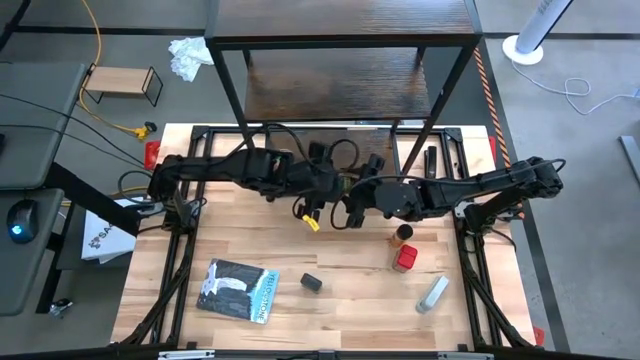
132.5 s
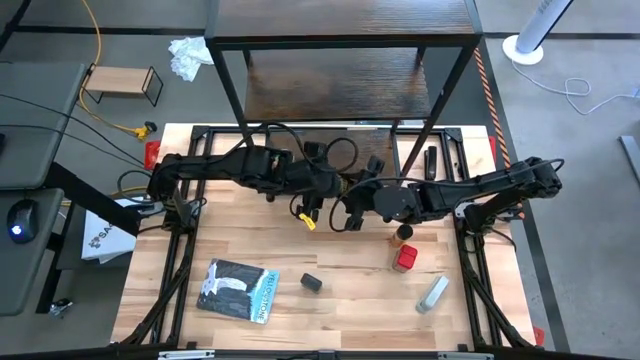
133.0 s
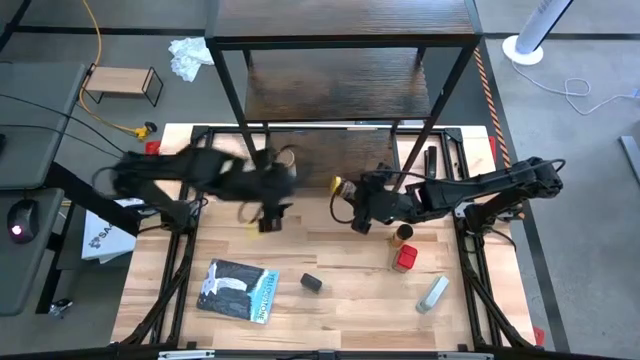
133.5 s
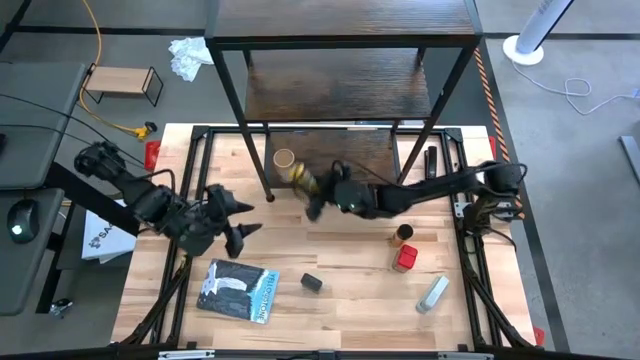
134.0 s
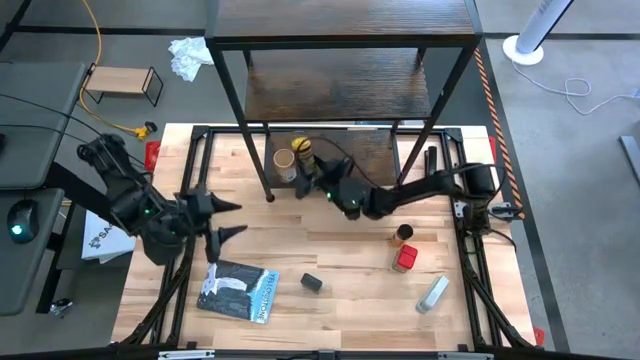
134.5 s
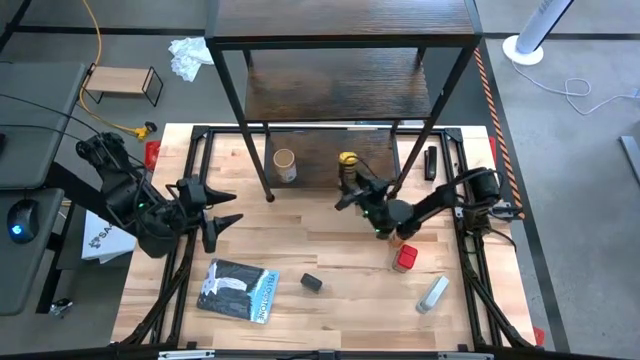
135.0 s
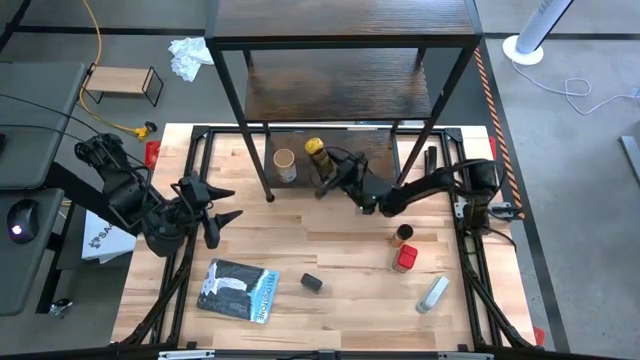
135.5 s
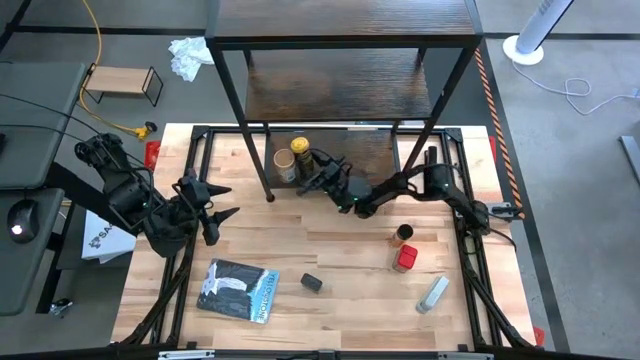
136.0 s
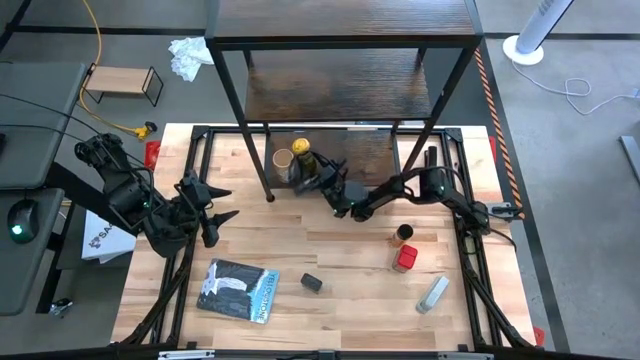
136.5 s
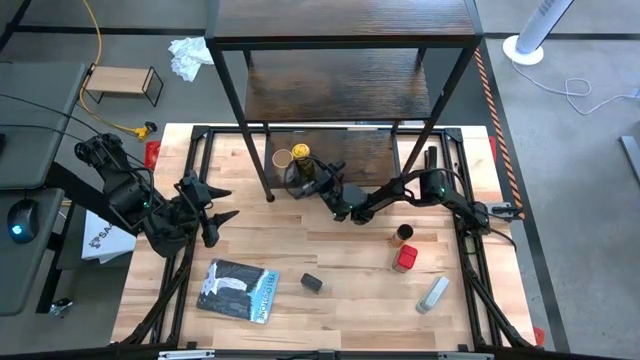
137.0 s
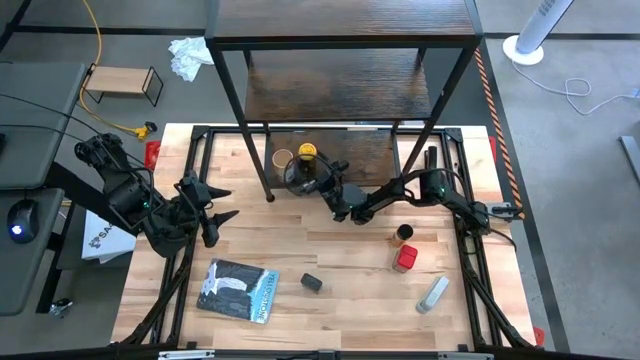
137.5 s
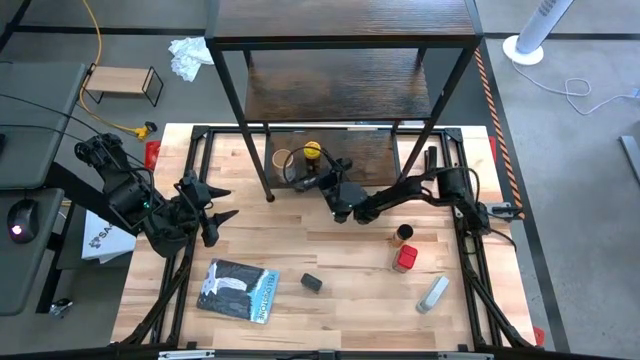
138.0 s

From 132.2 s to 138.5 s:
Task: Shelf spices
Put the yellow seasoning bottle on the shelf

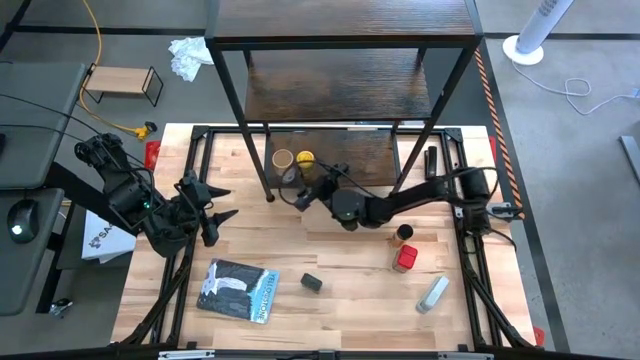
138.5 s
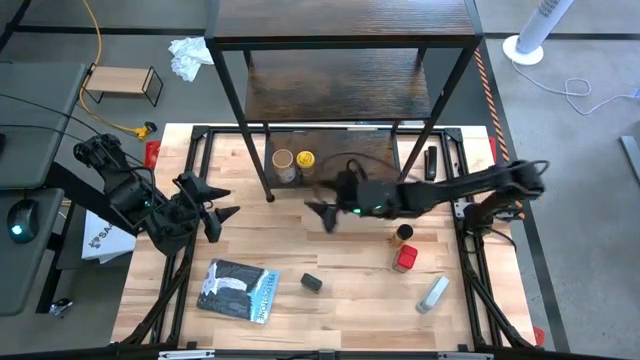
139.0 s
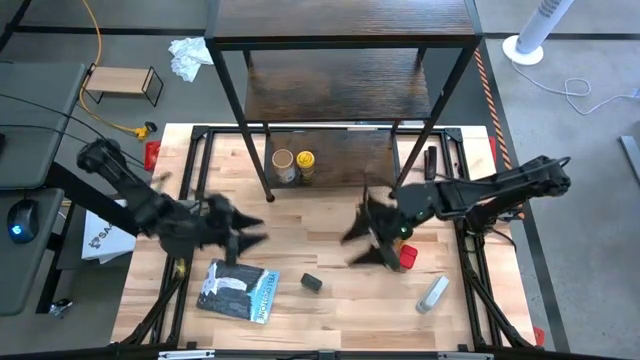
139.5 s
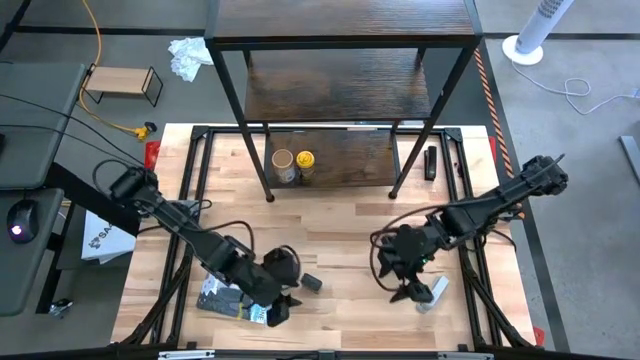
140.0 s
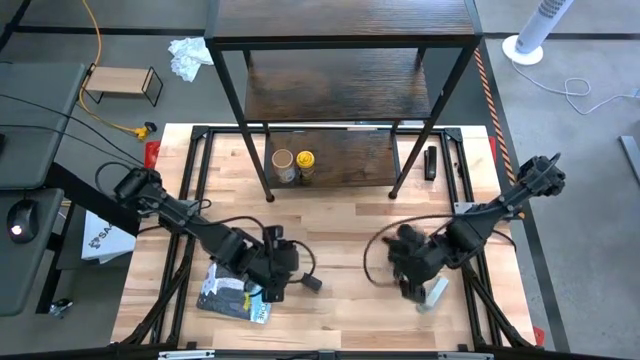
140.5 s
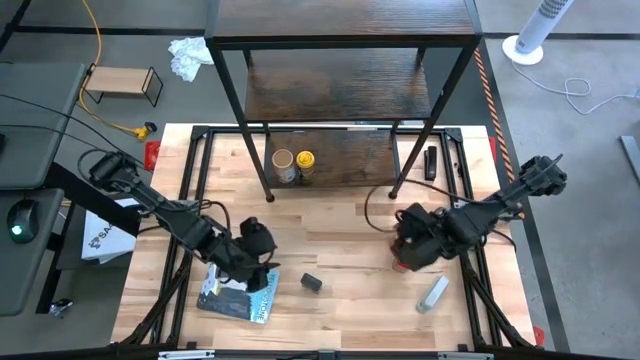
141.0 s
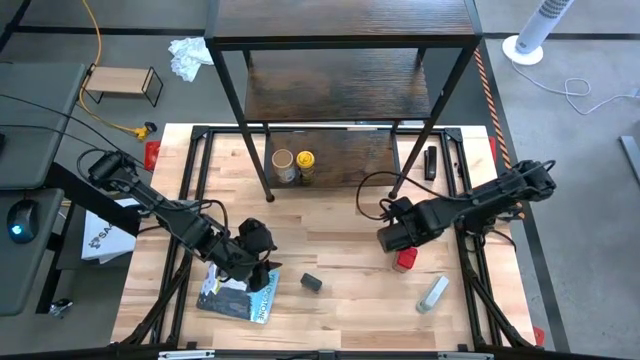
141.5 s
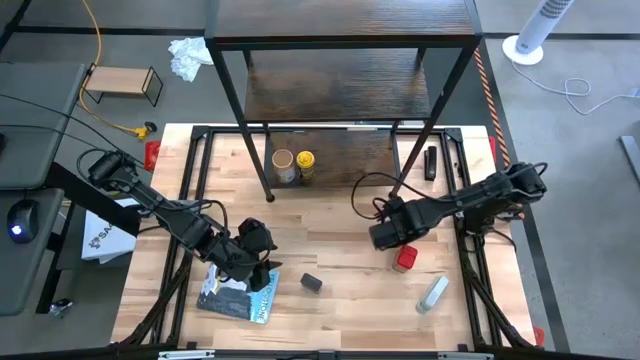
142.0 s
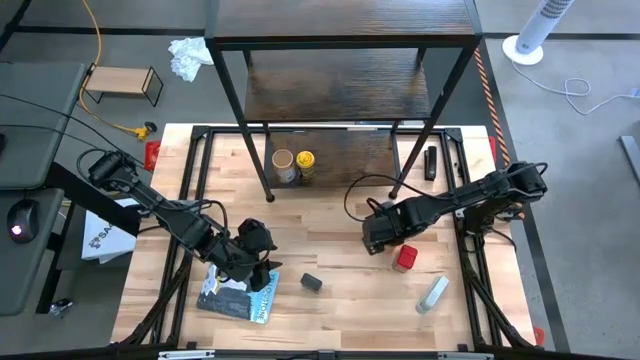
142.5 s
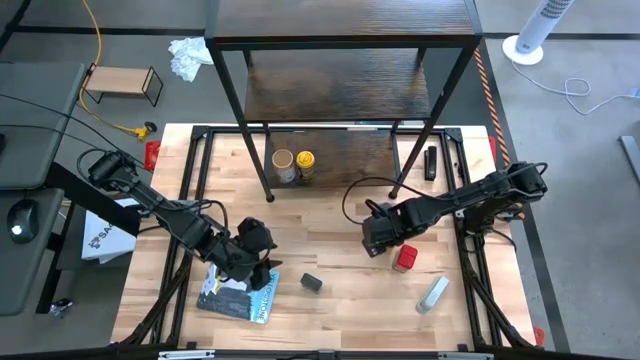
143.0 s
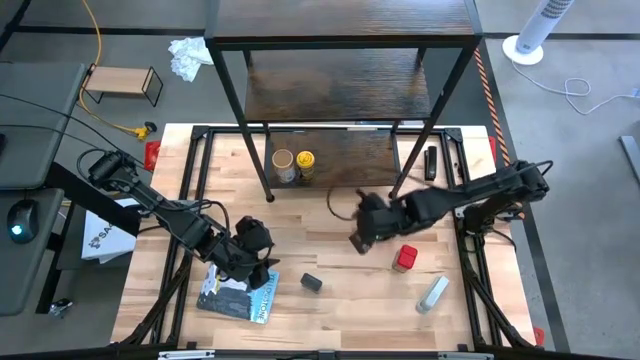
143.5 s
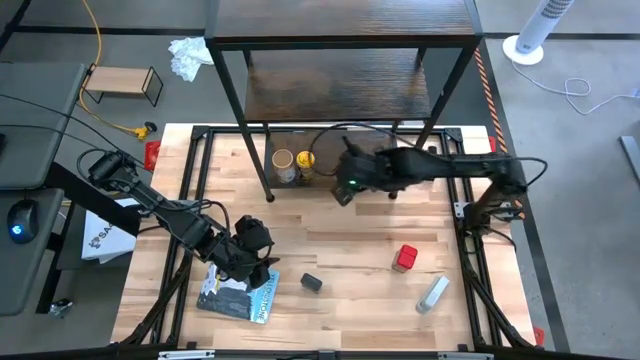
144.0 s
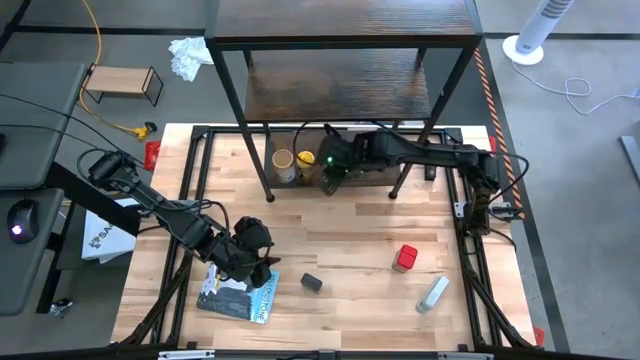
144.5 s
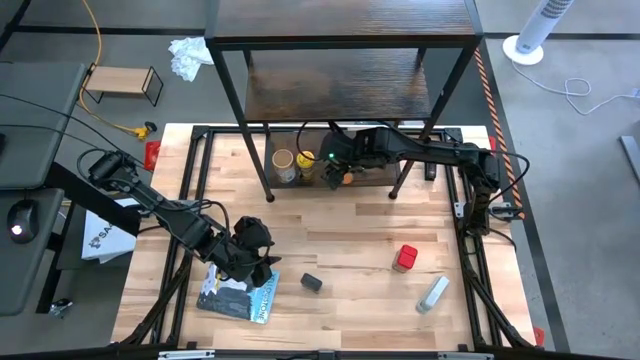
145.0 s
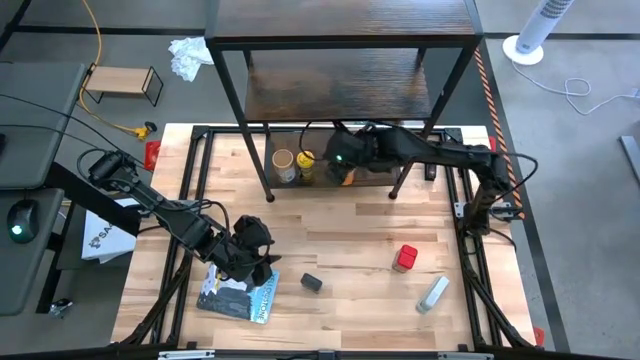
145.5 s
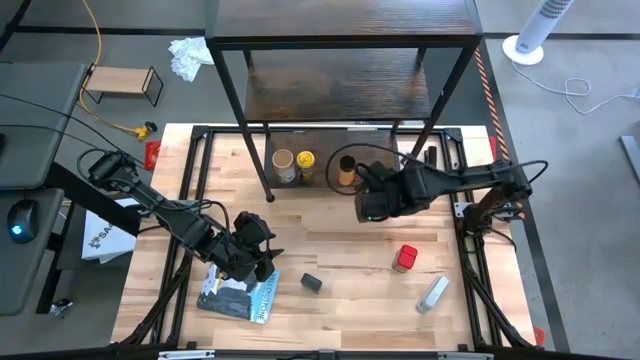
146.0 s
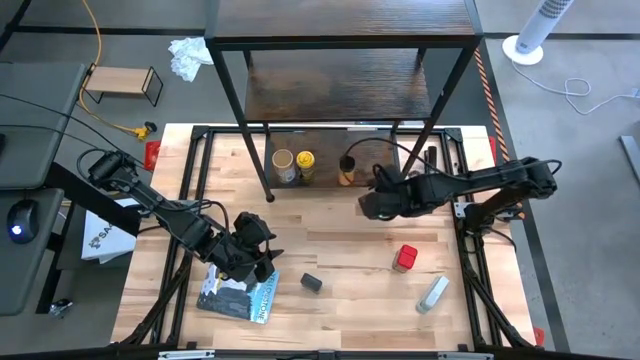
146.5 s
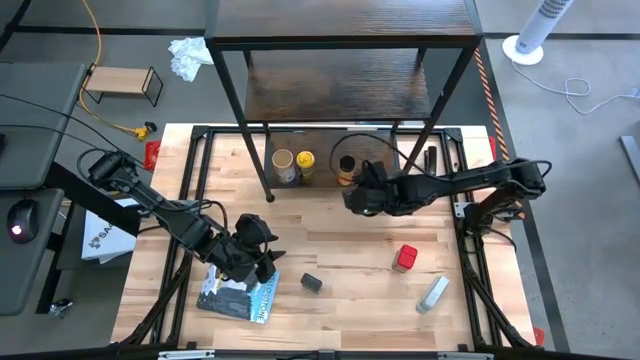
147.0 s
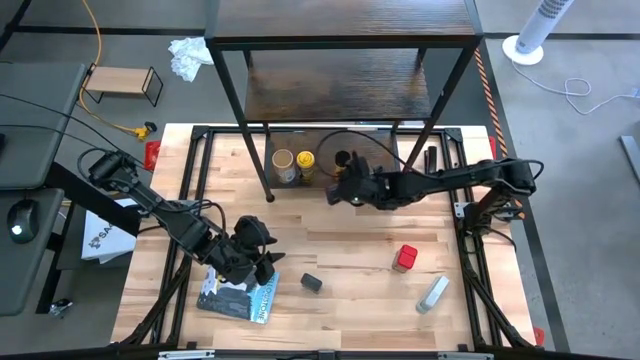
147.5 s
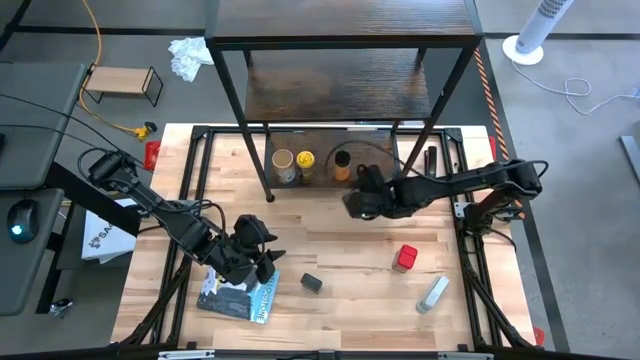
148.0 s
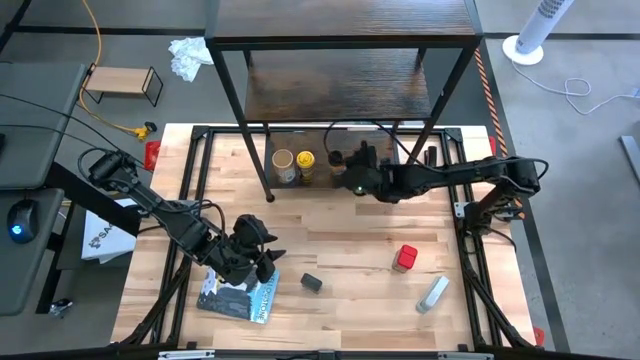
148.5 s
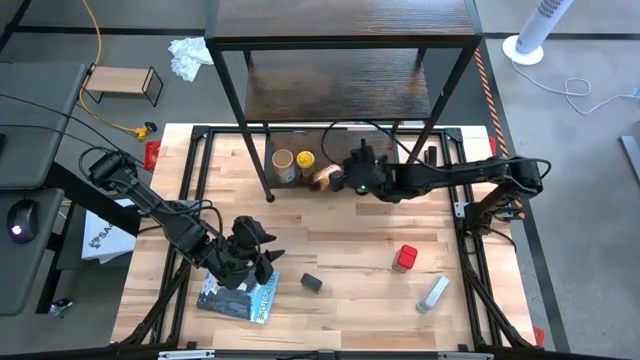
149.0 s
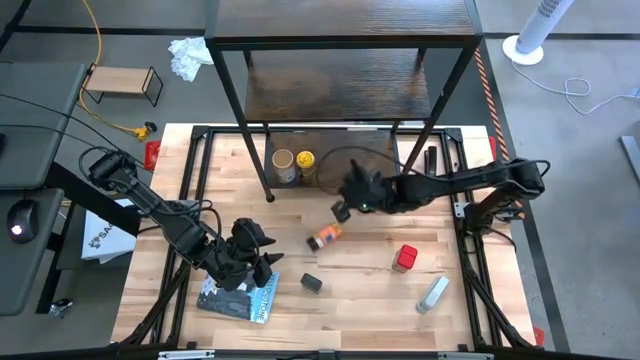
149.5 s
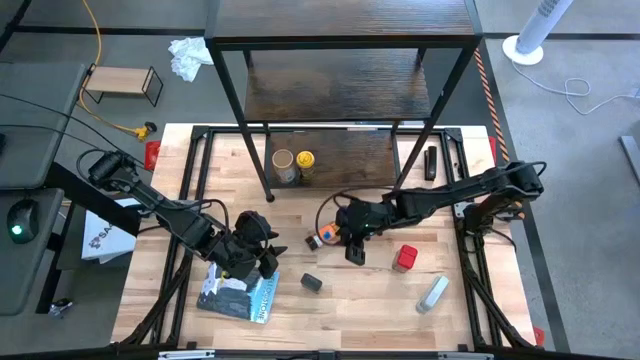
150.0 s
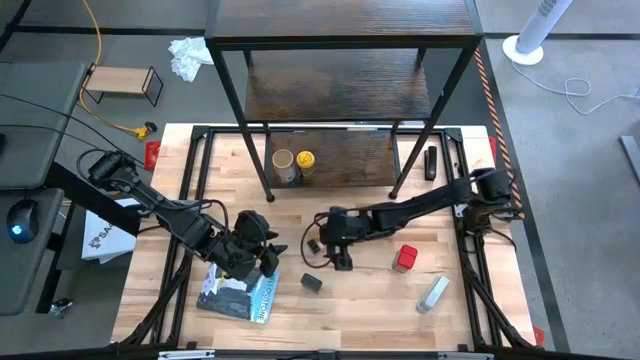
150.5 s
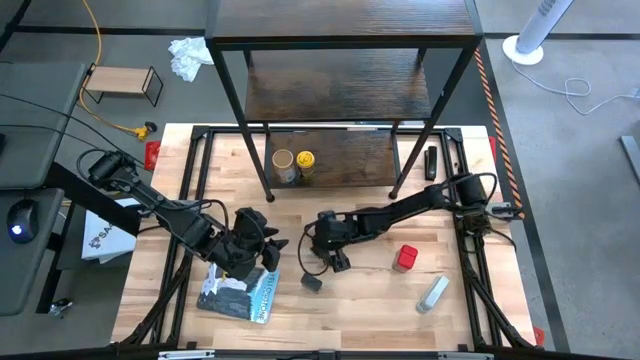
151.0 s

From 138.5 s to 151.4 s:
Put the orange seasoning bottle on the shelf

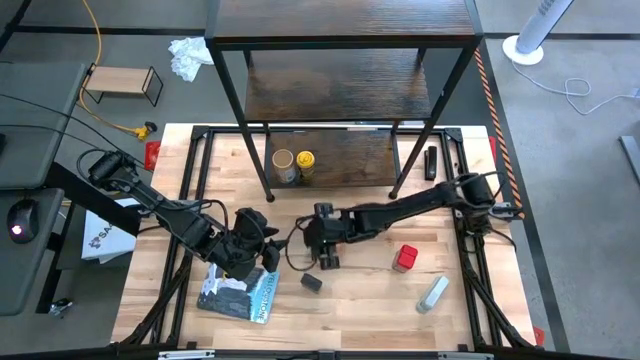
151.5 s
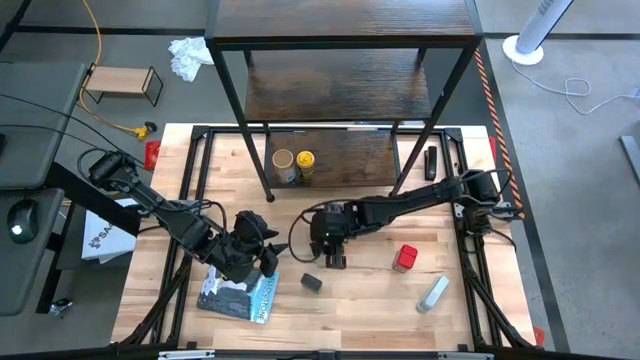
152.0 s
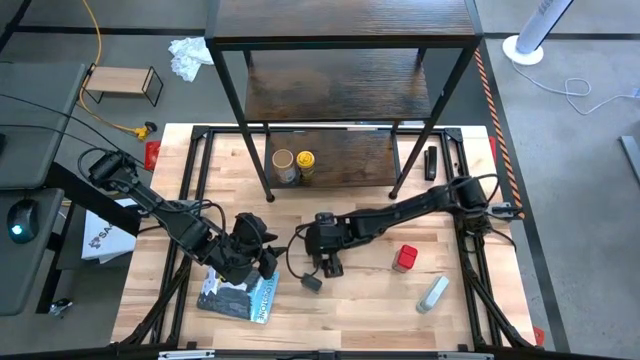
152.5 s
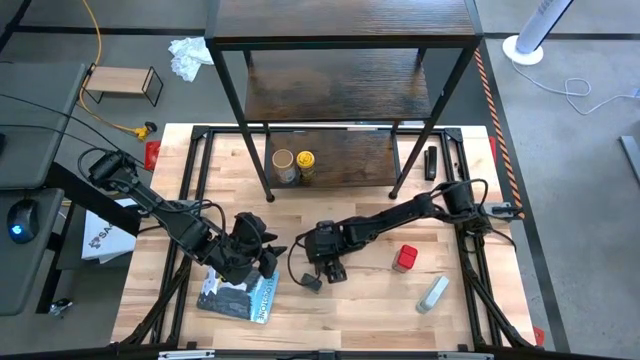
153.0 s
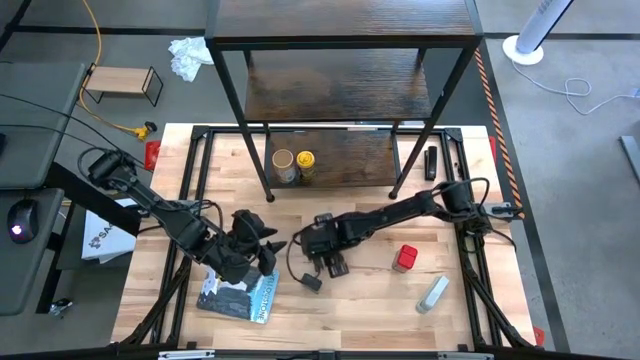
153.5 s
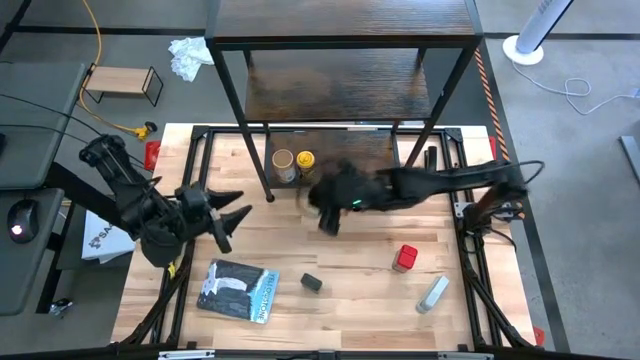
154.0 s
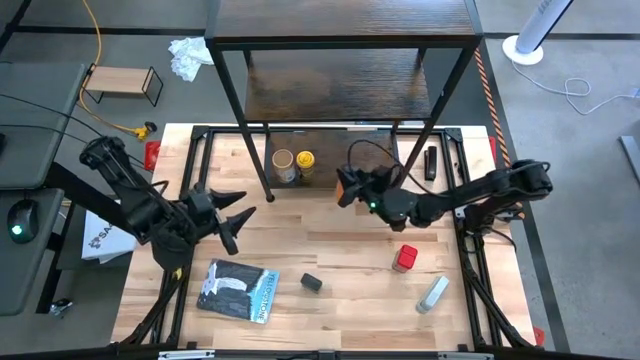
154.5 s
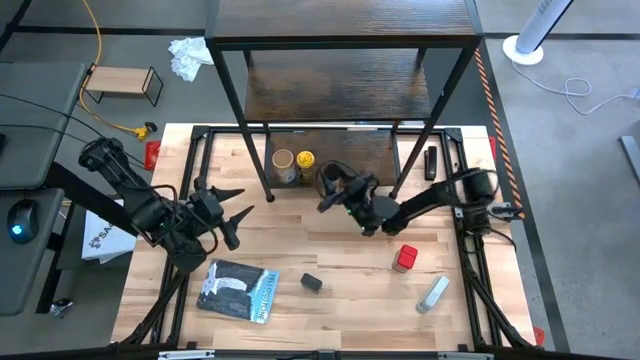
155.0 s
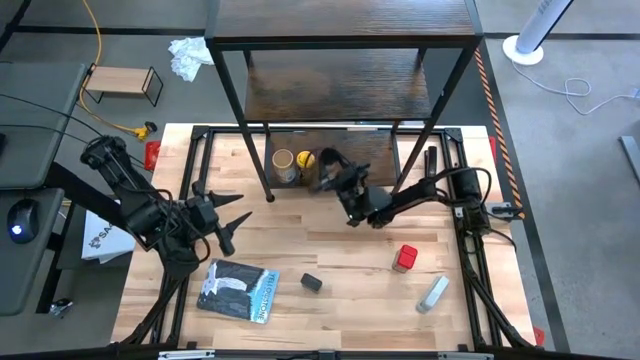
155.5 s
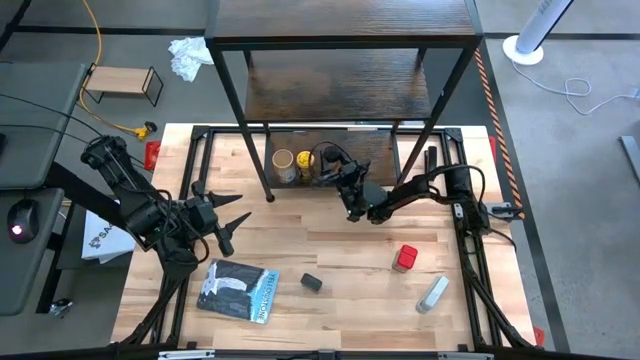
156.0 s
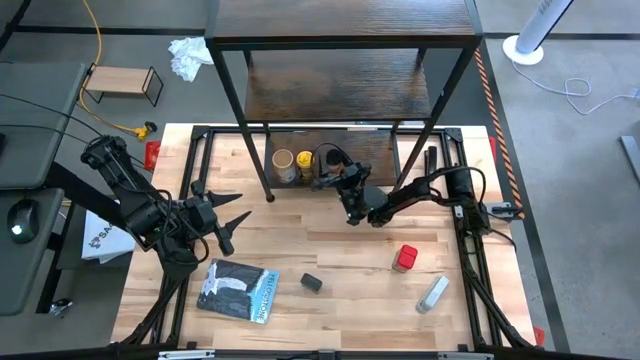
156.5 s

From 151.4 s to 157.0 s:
Put the orange seasoning bottle on the shelf
